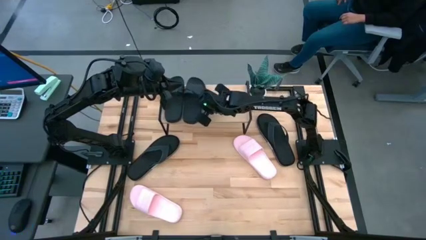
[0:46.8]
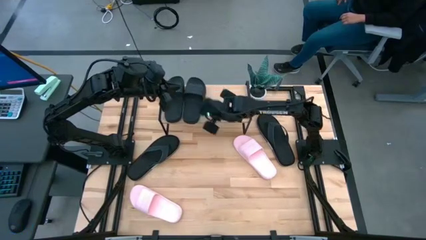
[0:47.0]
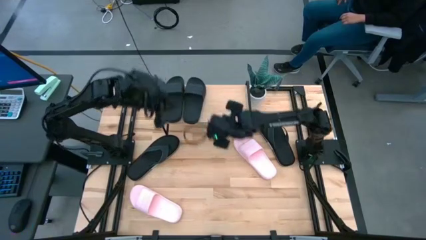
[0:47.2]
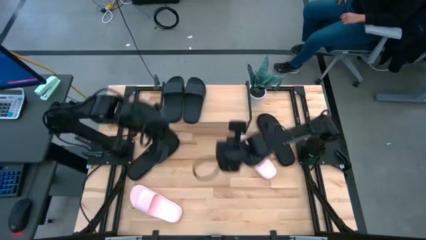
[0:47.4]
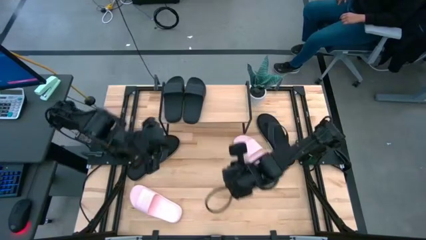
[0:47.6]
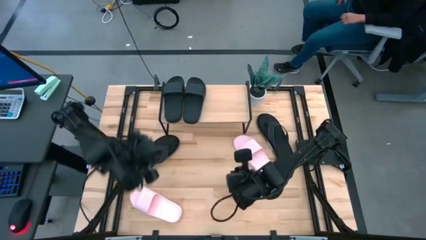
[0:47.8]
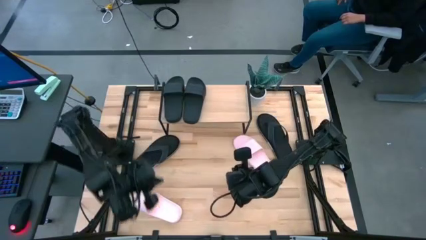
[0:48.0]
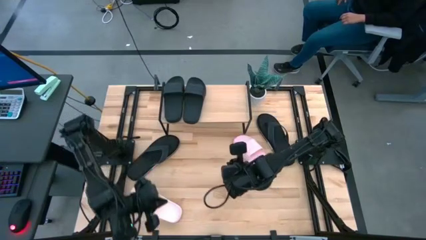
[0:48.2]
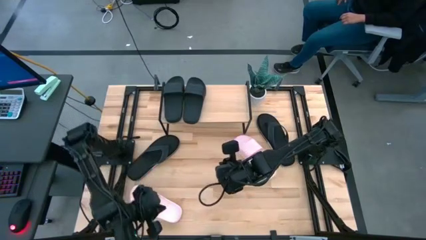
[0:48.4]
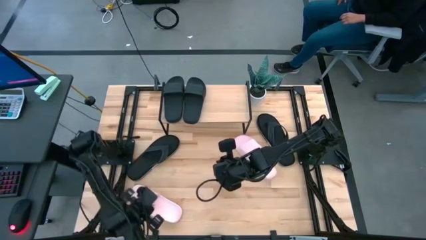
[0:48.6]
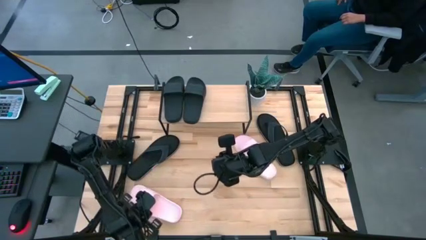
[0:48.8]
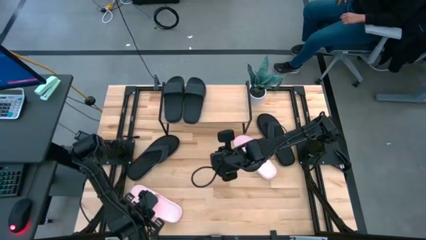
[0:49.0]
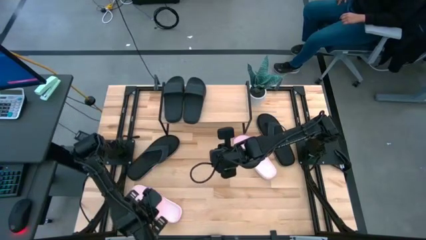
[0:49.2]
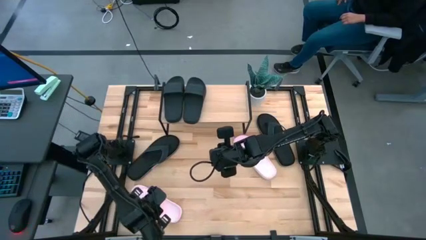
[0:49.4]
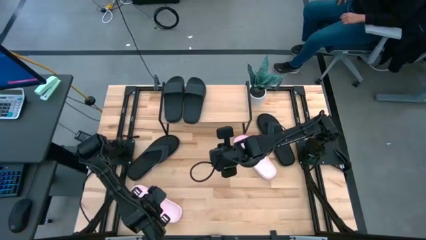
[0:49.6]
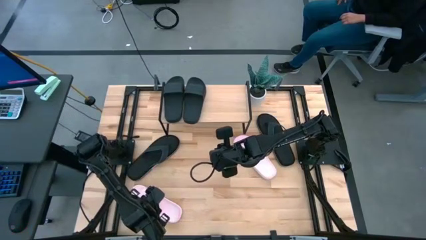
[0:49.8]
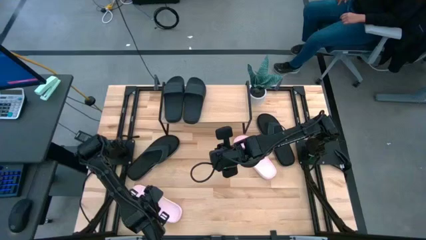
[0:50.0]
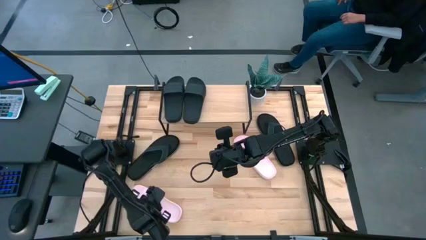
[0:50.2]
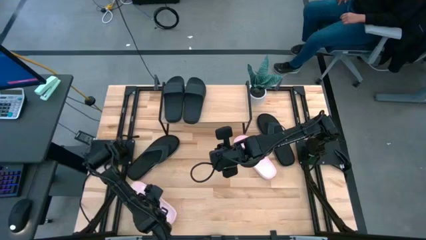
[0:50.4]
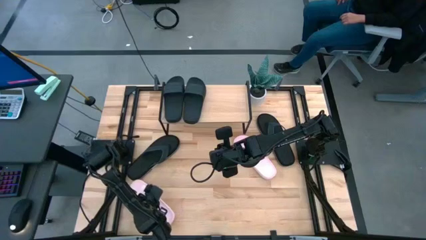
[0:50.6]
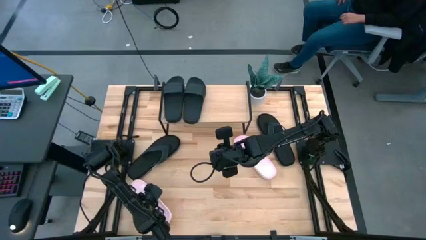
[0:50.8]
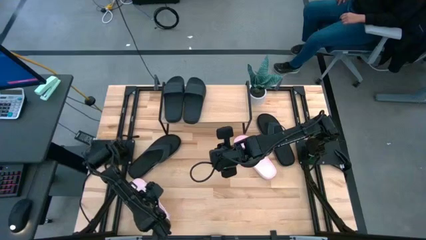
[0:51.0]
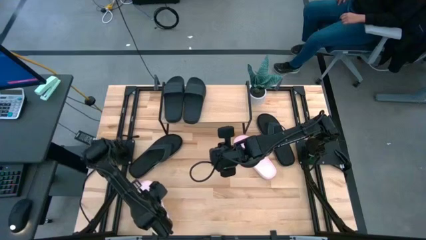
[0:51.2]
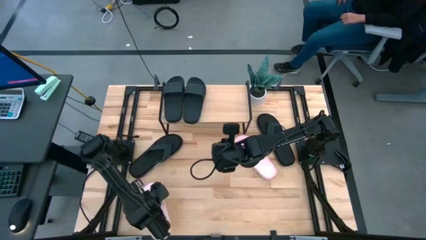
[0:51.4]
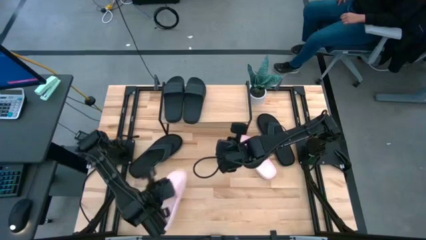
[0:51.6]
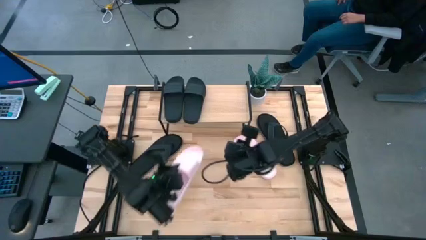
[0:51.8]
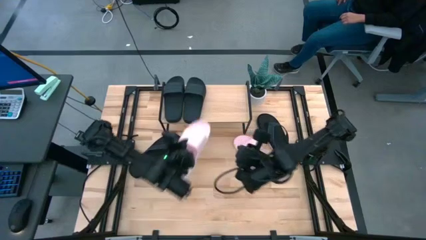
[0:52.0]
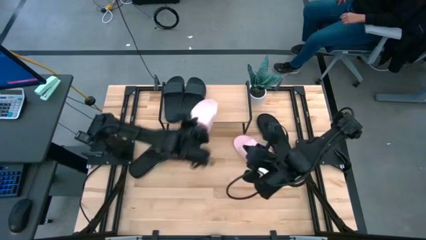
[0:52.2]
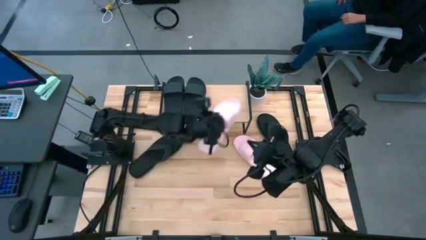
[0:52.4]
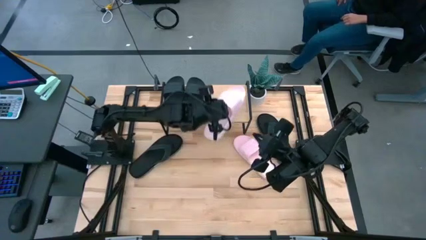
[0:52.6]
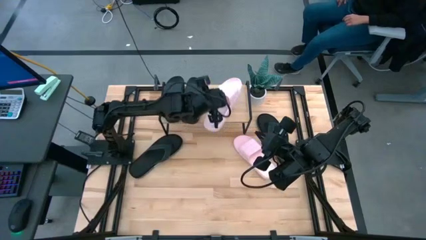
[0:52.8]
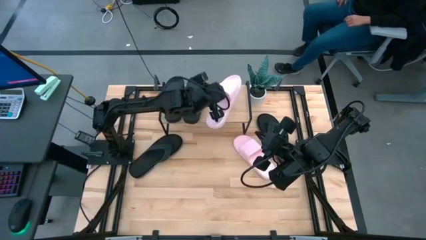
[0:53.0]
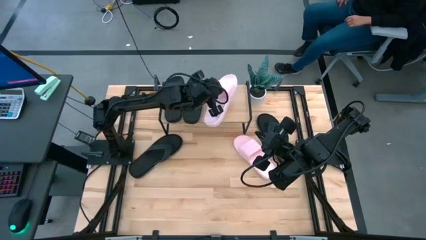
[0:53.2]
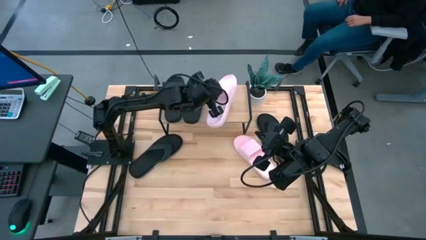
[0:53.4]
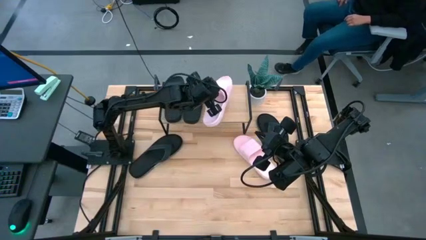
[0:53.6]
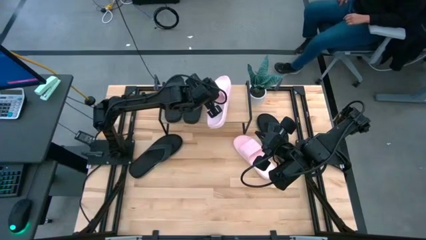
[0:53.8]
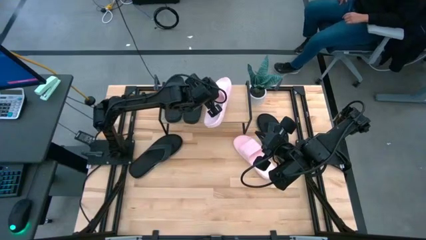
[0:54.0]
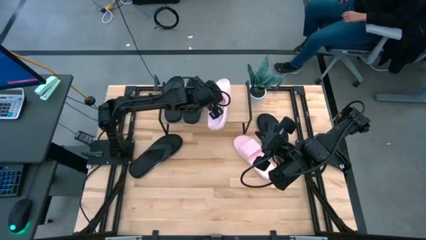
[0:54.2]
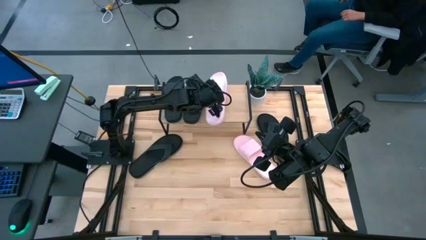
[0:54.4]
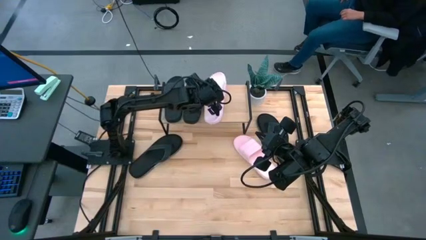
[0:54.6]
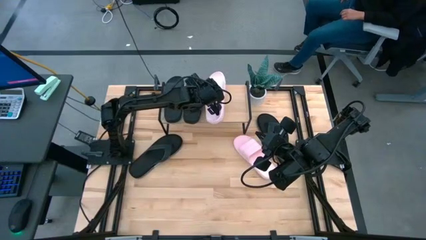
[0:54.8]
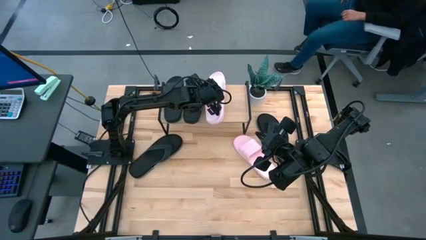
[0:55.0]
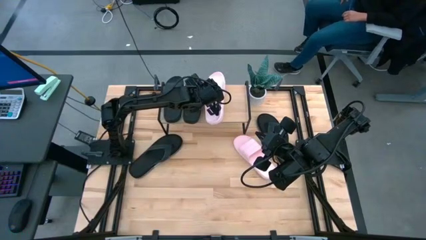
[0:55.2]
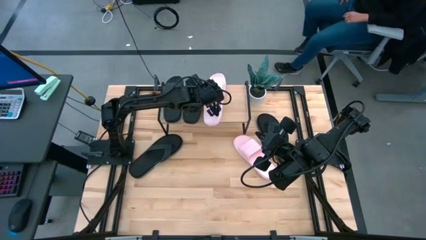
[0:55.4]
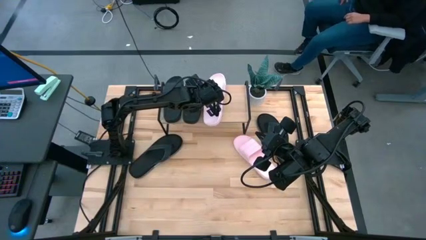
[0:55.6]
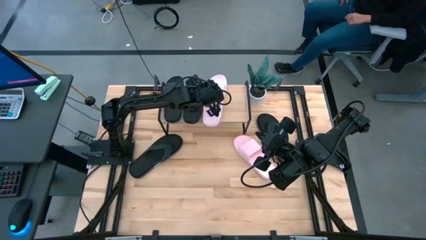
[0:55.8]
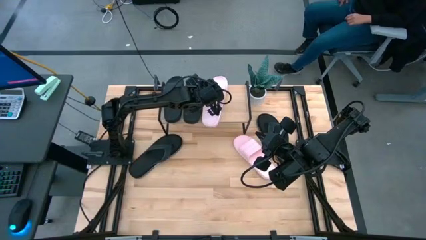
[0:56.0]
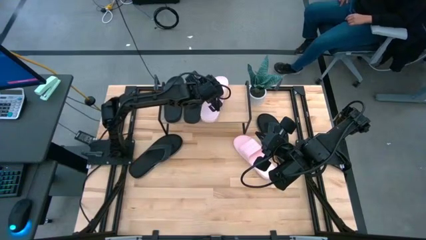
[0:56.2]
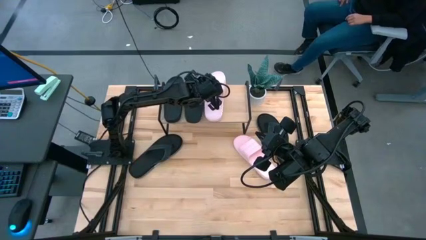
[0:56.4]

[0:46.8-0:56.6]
Task: Pick and place slides into the shelf
Put the left pink slipper on the shelf

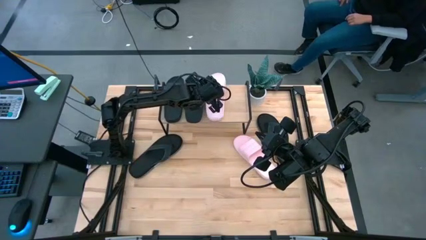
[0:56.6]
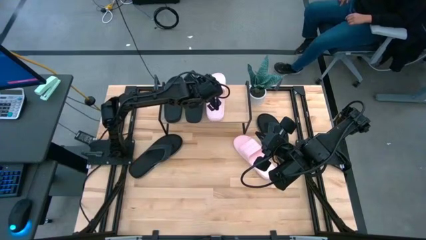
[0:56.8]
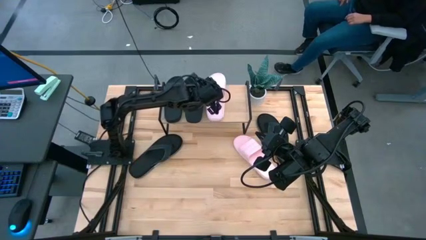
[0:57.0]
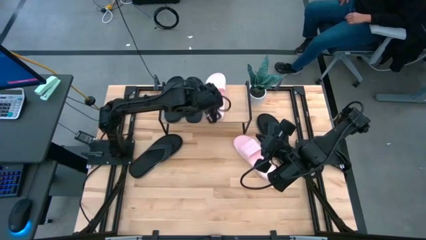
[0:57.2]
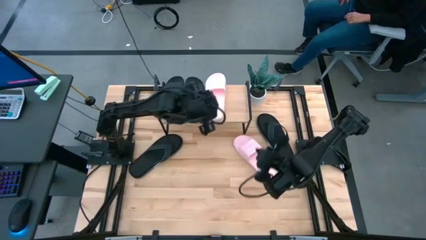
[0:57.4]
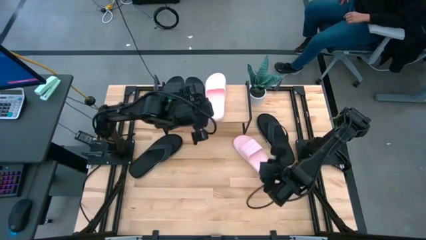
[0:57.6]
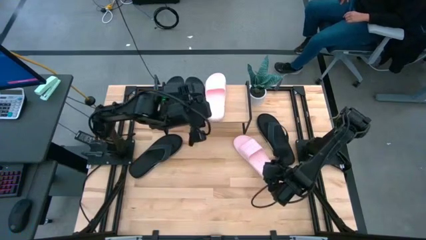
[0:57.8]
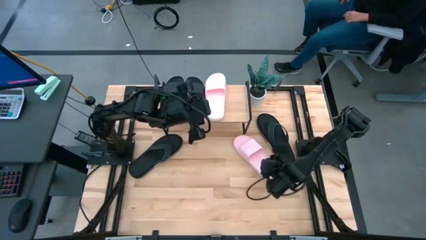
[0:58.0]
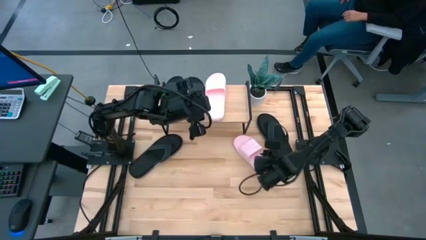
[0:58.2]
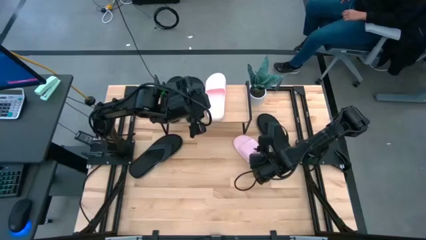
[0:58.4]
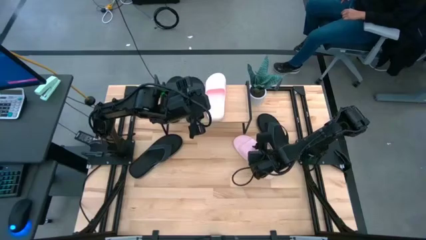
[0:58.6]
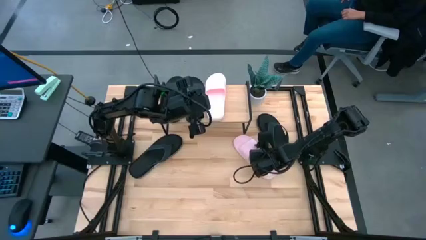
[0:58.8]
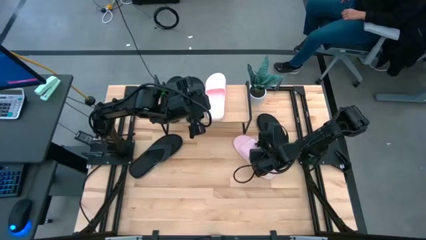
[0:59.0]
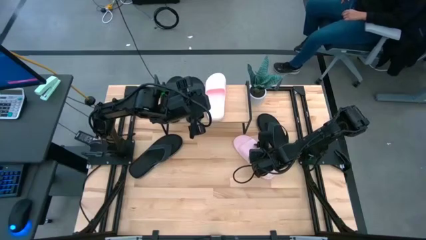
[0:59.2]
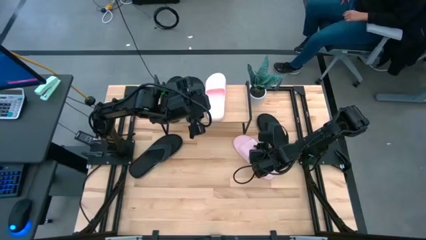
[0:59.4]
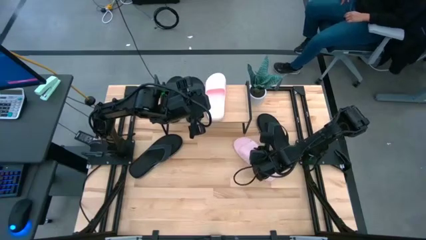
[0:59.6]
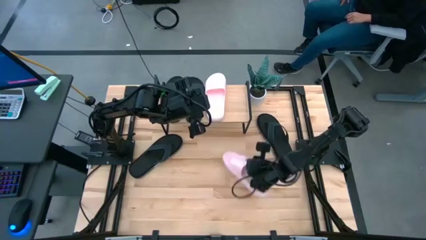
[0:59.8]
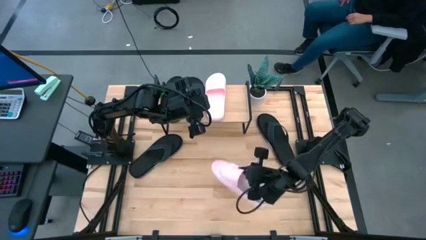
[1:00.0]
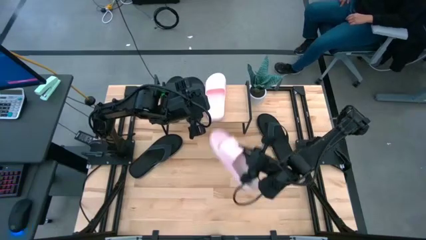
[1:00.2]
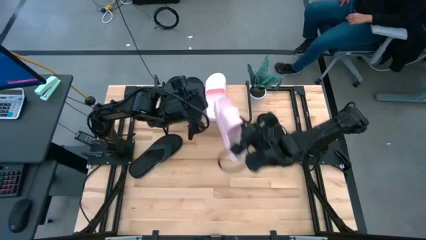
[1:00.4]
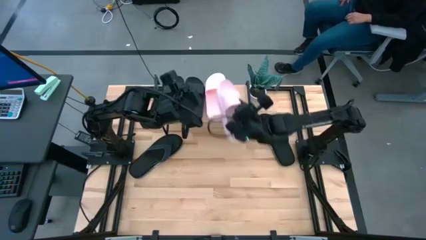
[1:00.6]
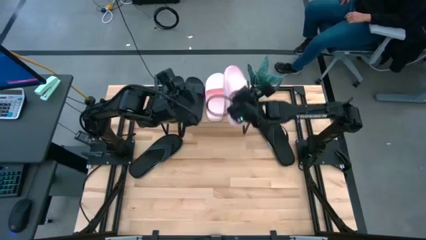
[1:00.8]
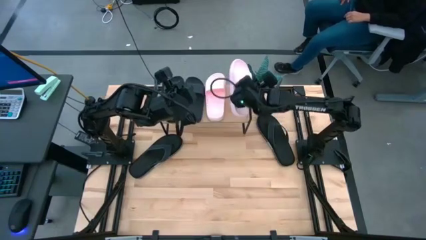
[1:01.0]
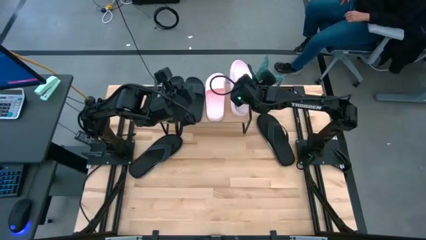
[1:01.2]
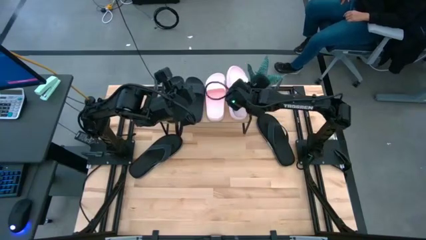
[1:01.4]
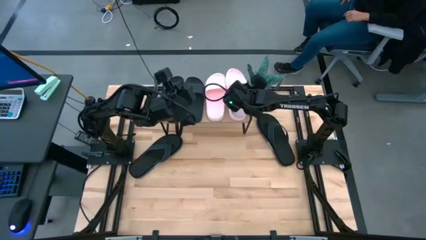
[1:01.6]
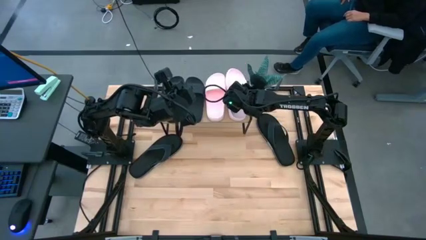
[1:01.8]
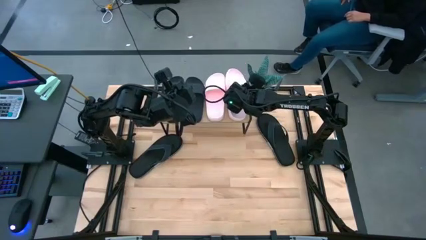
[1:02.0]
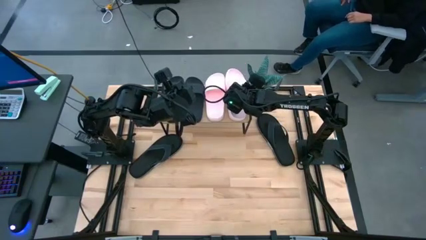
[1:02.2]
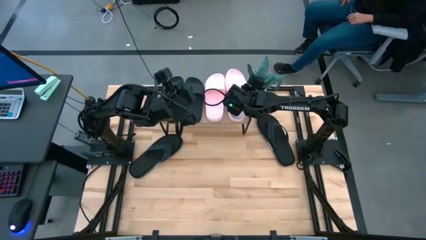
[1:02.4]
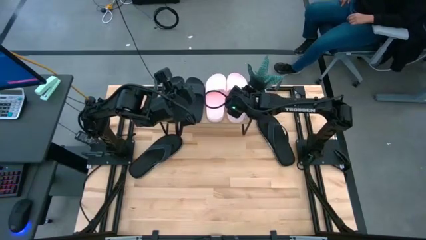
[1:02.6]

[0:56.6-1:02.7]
Put the pink slipper on the shelf

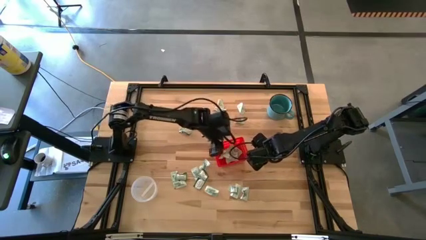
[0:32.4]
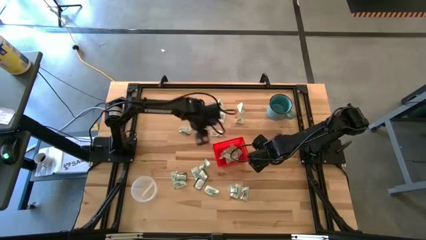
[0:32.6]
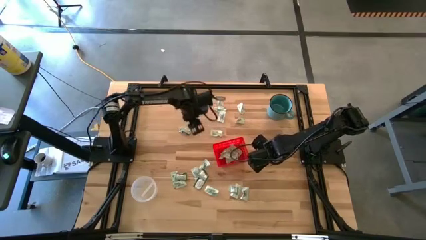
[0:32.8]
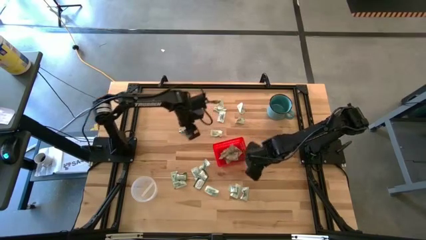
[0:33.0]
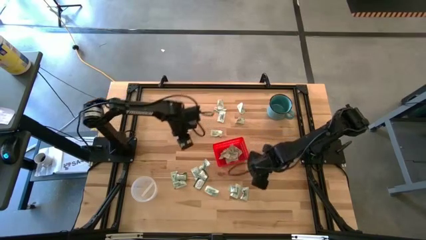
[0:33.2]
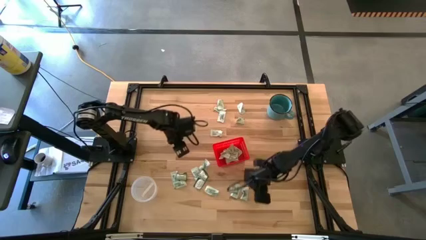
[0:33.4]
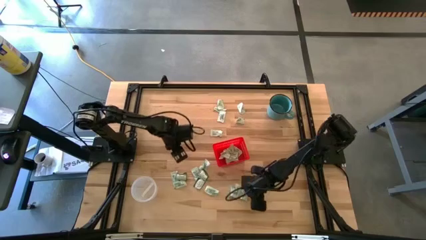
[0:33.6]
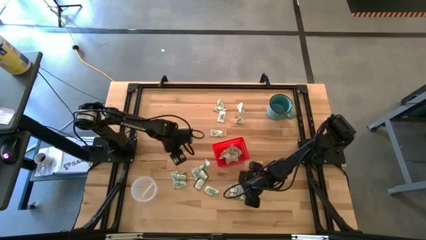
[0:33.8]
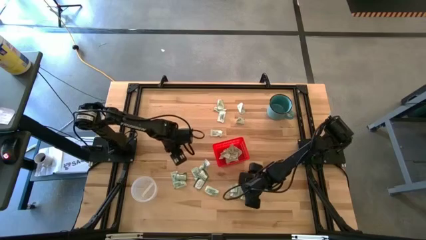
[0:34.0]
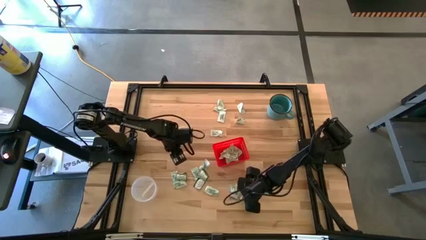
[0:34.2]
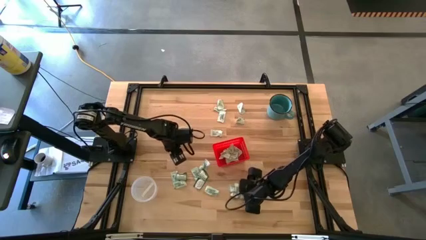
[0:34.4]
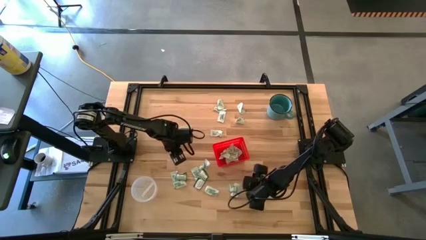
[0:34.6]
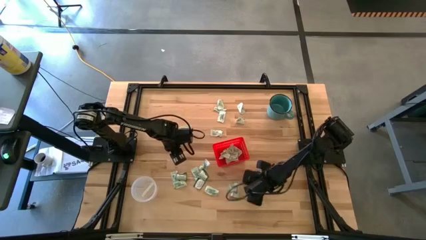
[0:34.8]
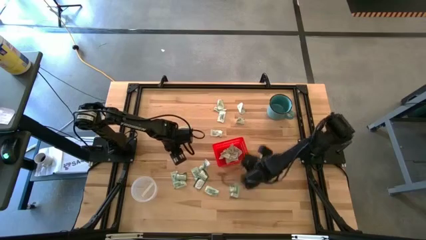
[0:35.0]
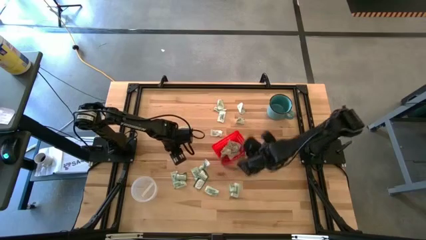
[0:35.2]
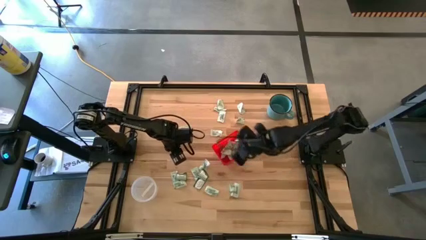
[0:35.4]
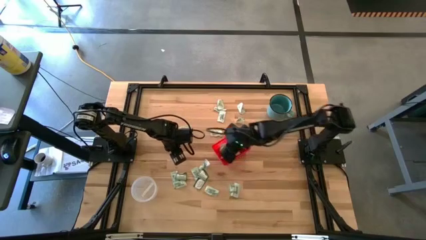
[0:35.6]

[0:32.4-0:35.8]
Task: Pick and place items into bin
Put the white stevia pack into the red bin
